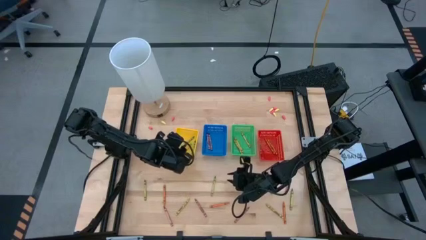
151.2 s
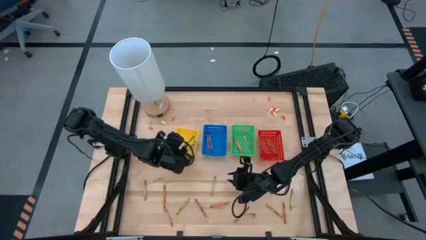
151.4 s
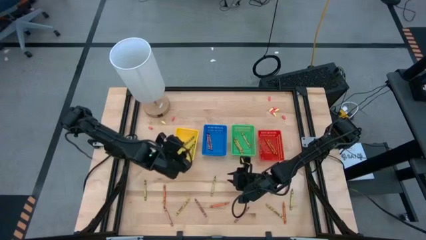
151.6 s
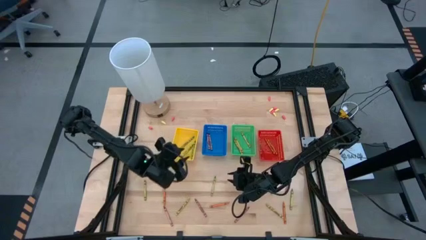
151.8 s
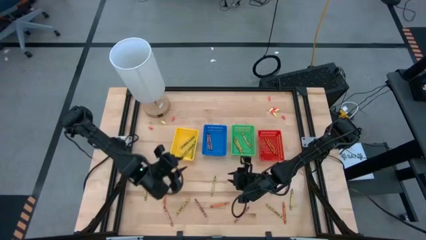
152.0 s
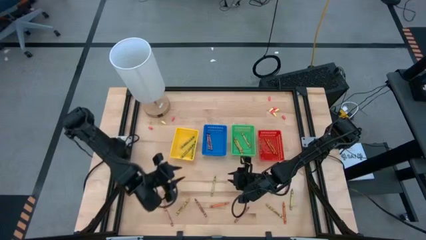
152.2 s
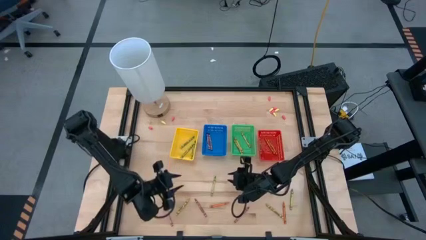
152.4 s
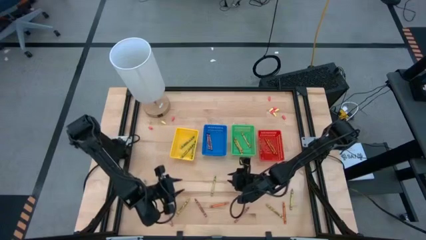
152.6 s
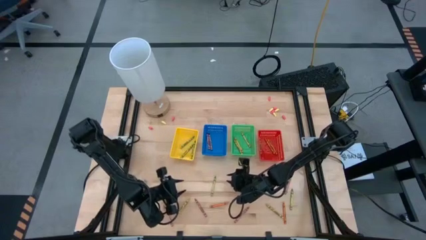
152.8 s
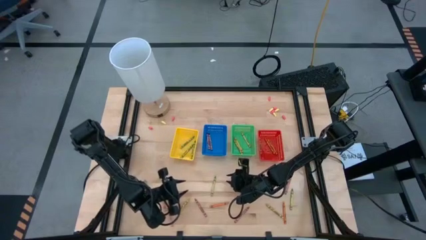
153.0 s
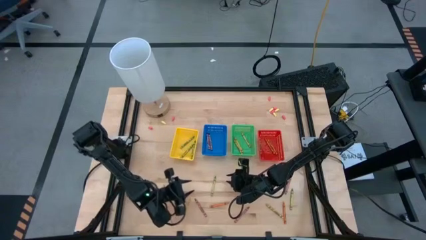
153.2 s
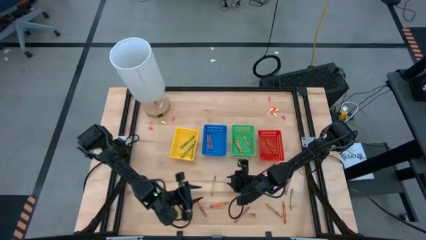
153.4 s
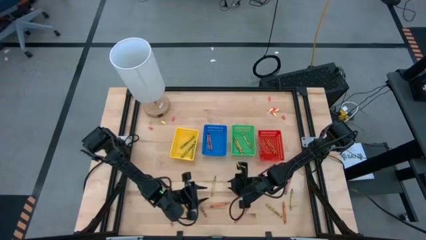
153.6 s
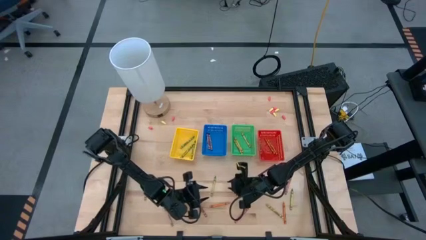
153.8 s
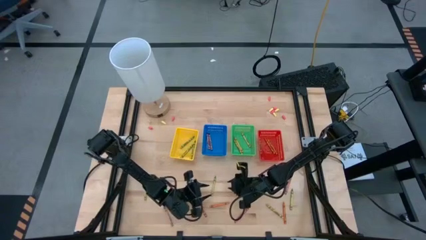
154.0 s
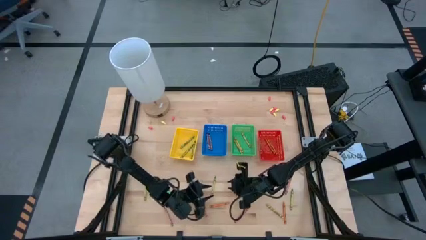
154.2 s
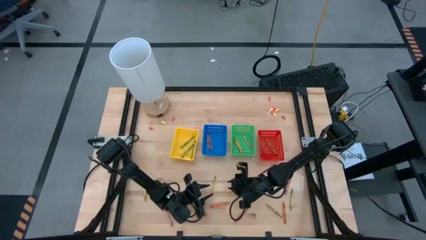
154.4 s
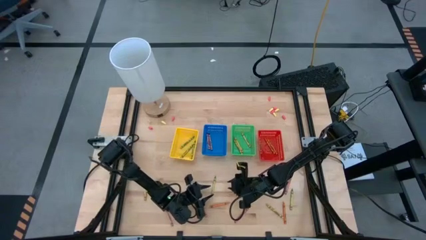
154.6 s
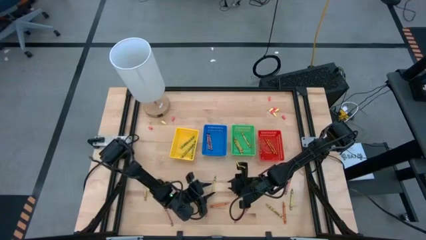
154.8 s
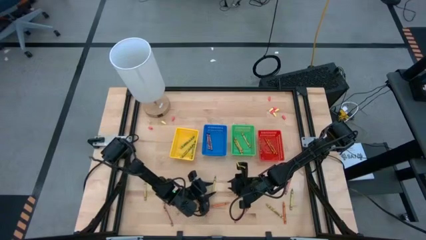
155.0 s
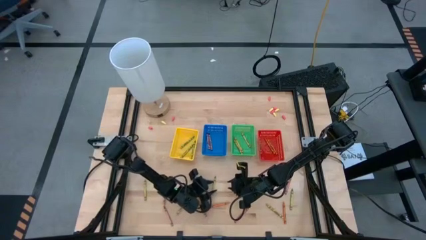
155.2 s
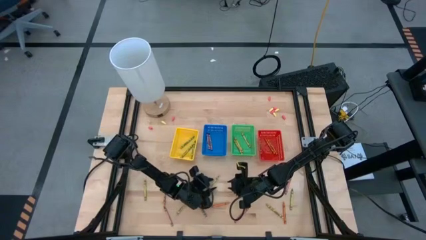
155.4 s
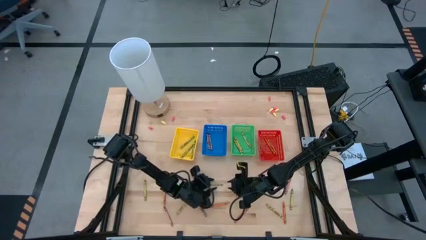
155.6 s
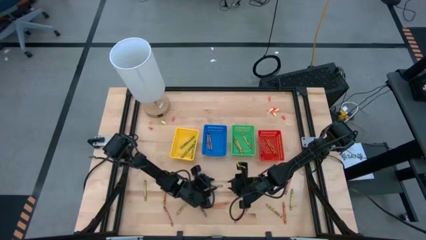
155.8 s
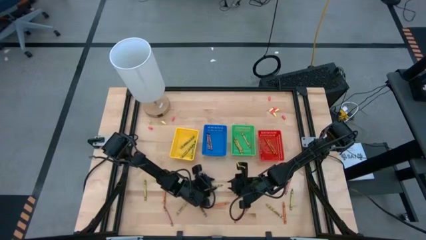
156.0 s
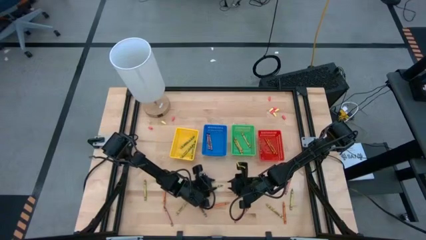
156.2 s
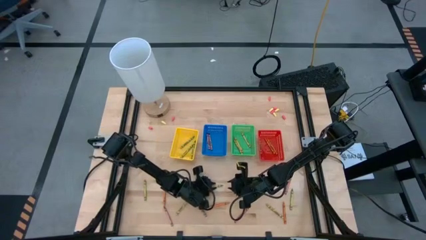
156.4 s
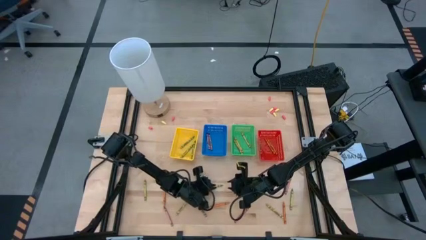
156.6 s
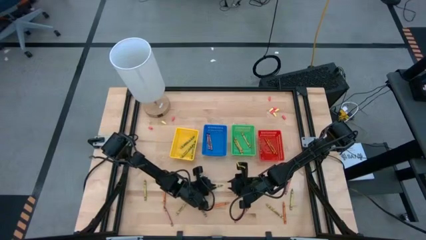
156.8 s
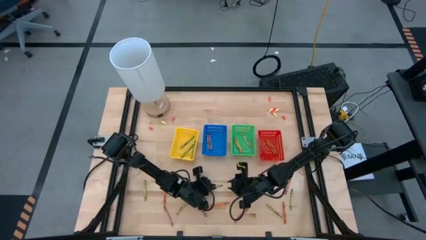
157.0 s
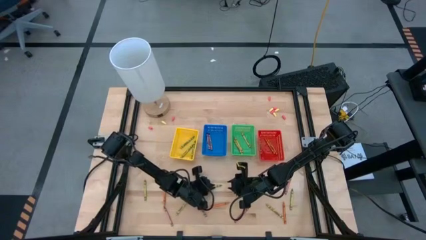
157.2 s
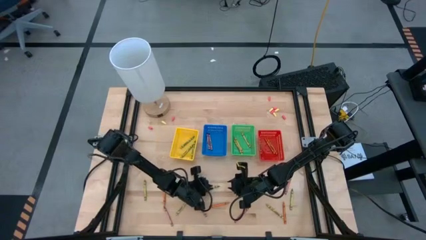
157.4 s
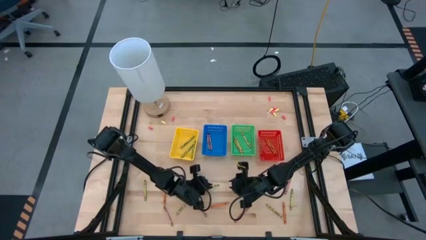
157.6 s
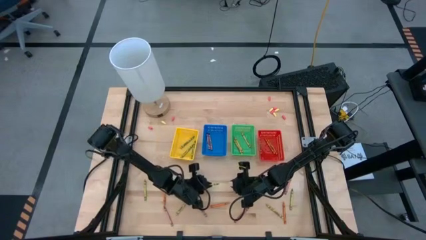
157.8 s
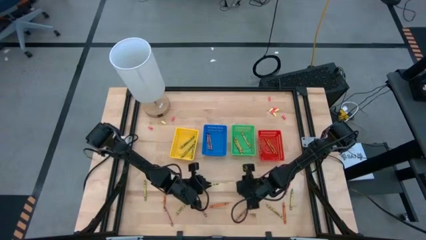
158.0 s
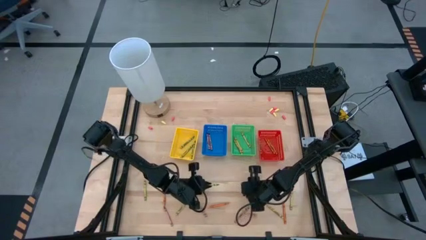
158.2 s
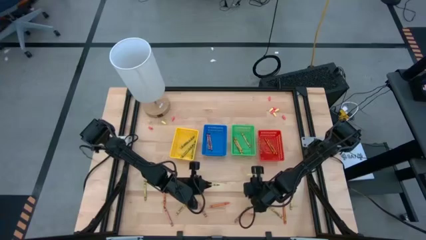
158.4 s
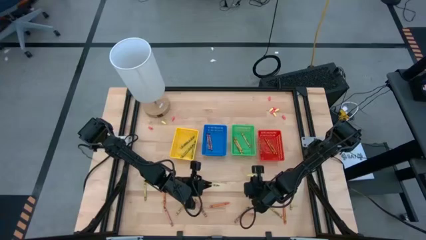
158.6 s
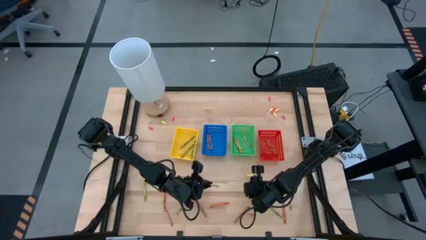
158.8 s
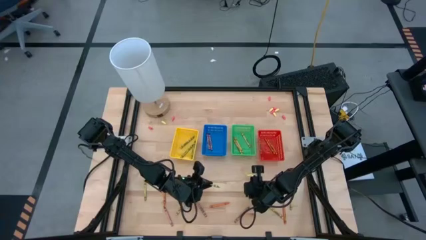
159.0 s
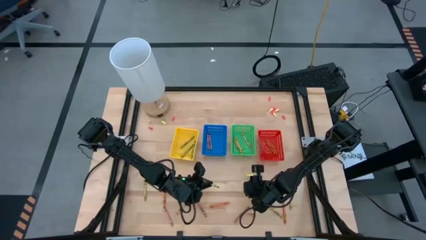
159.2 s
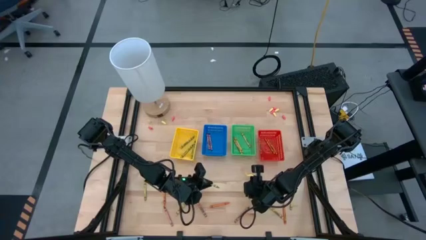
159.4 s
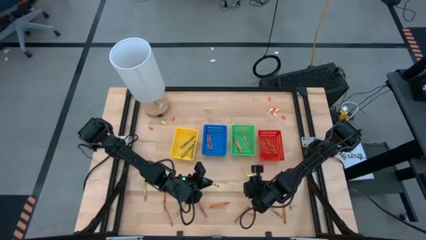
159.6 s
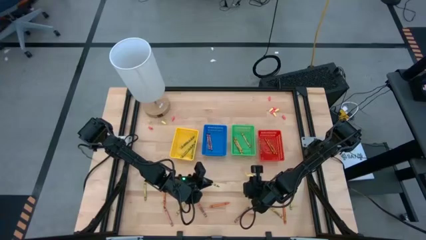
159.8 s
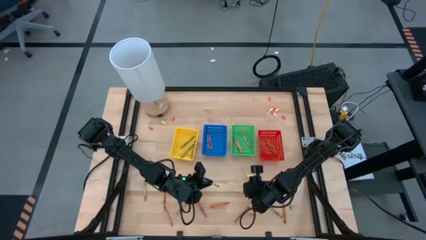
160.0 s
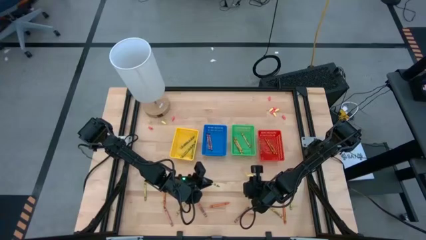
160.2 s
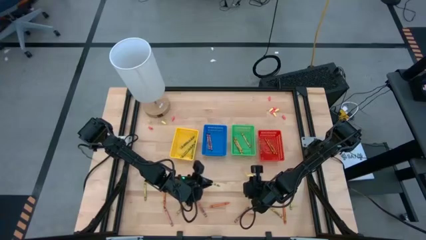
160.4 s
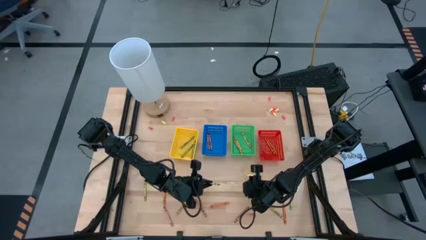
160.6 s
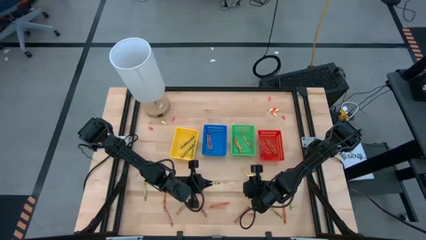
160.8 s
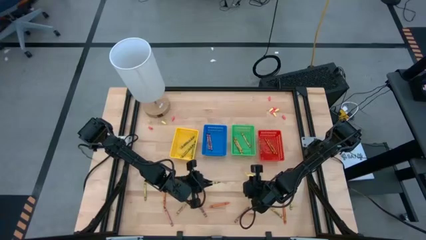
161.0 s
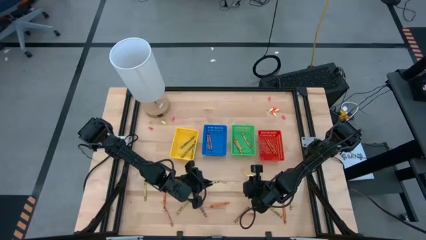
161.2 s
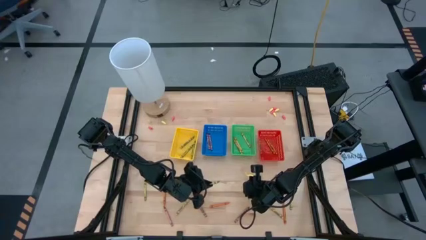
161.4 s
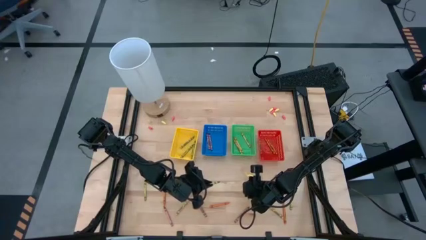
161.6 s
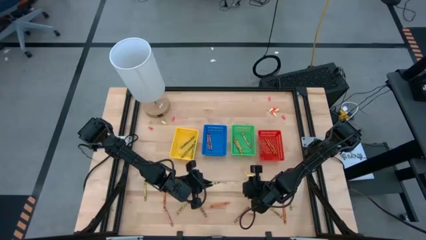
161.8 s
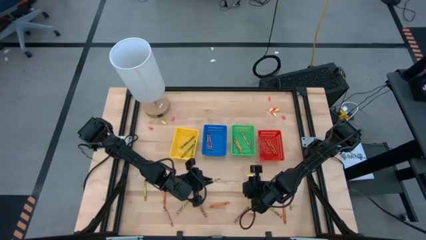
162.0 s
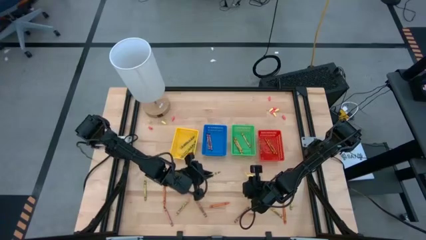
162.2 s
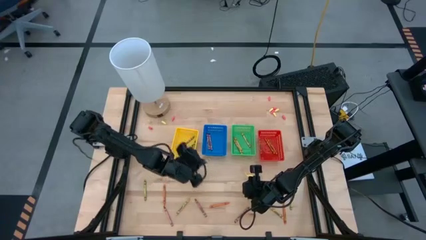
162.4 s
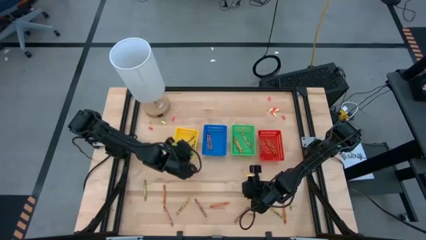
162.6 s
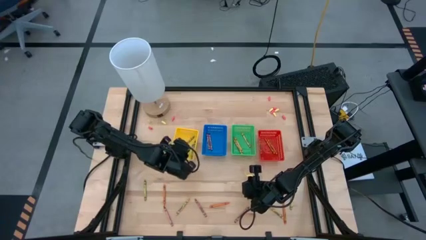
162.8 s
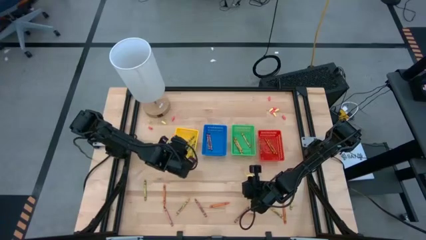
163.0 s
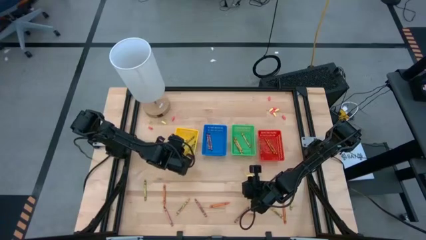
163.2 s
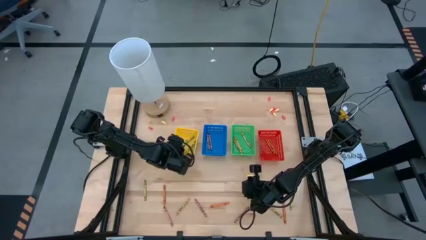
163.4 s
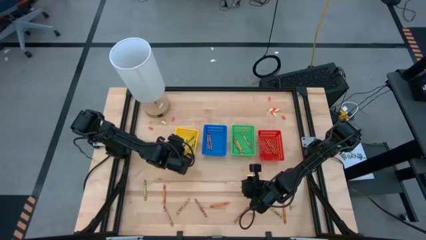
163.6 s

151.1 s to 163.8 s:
Task: Sort crayons
Put the green crayon into the yellow bin

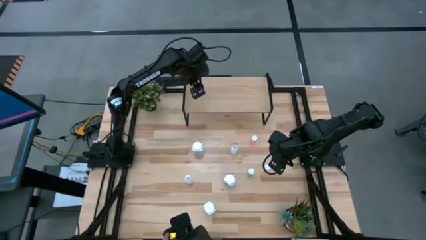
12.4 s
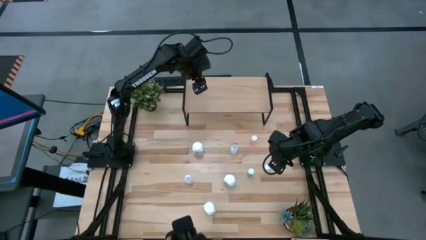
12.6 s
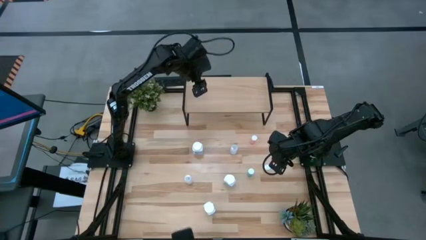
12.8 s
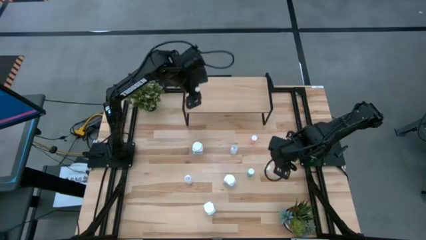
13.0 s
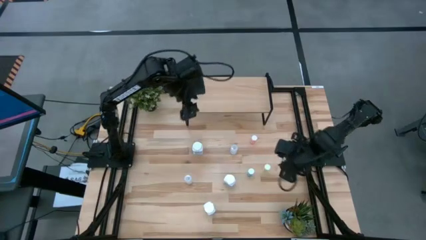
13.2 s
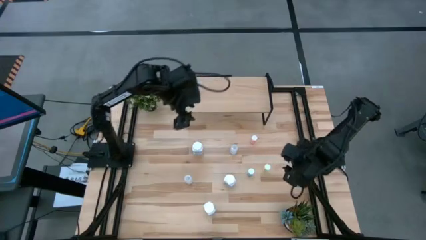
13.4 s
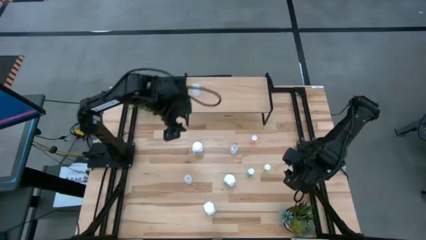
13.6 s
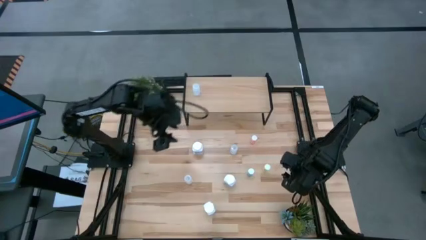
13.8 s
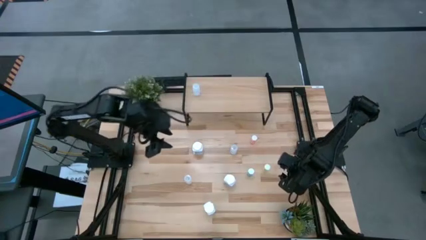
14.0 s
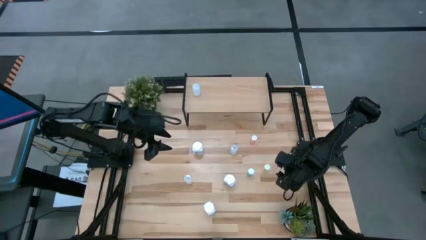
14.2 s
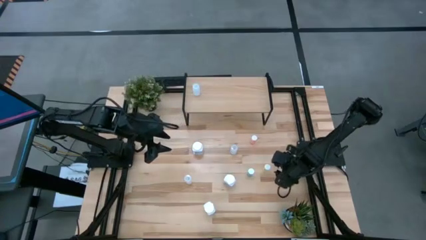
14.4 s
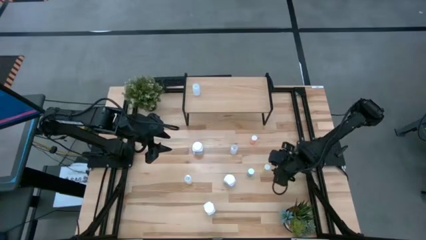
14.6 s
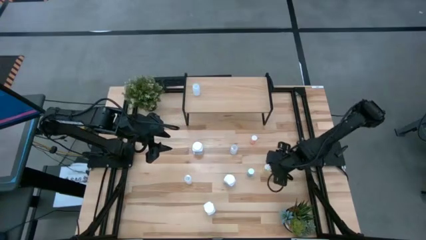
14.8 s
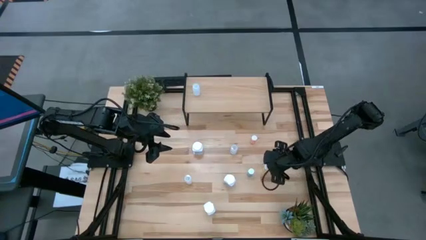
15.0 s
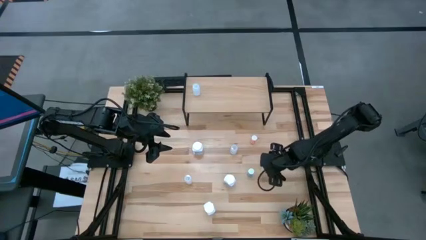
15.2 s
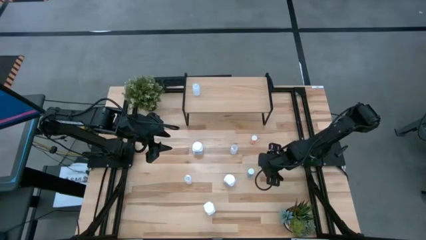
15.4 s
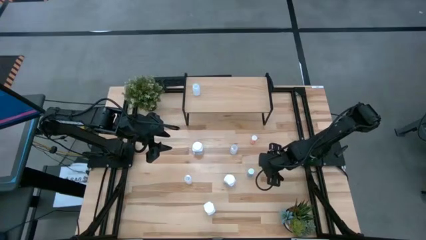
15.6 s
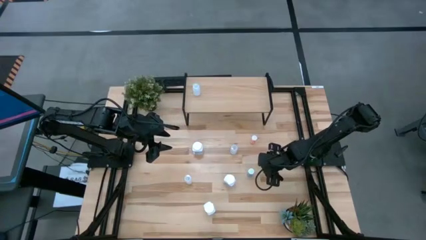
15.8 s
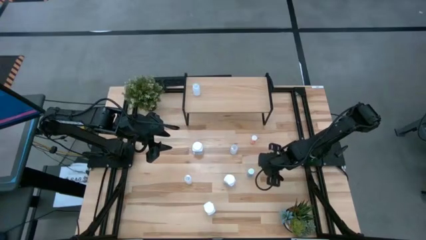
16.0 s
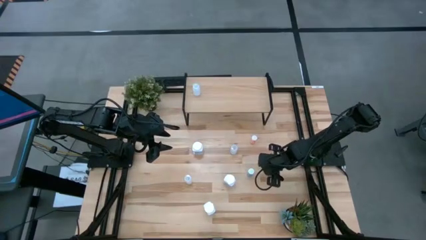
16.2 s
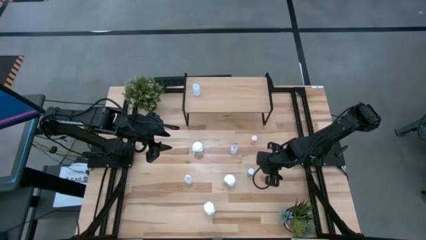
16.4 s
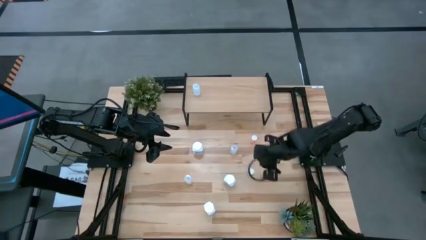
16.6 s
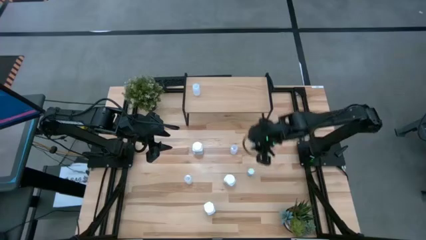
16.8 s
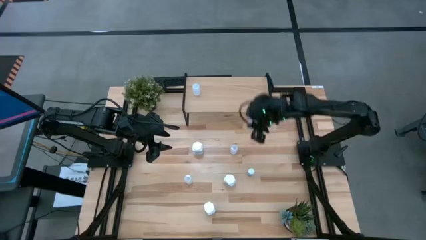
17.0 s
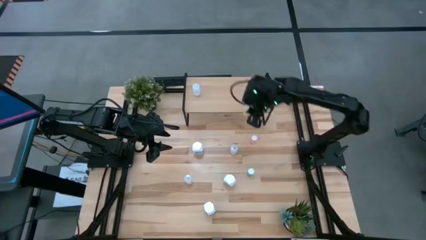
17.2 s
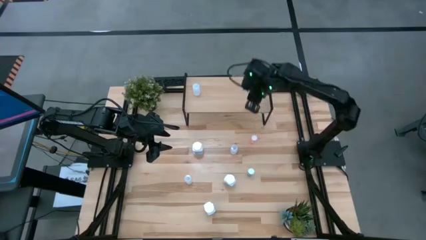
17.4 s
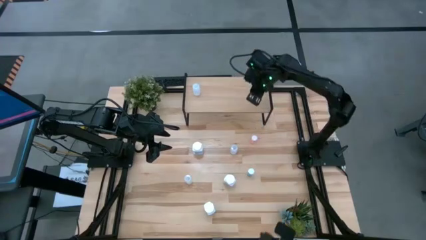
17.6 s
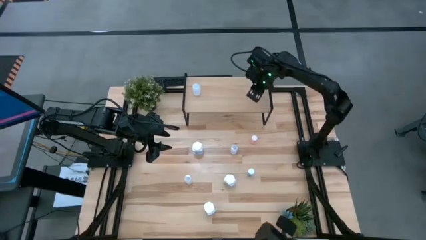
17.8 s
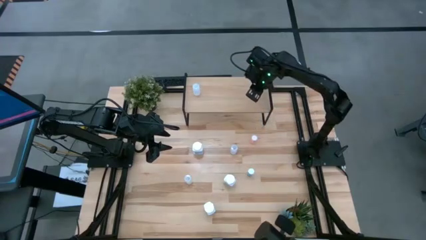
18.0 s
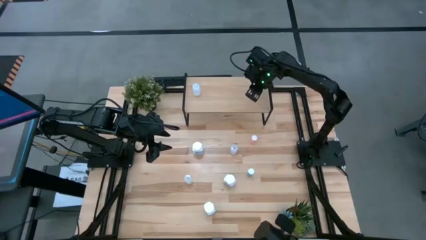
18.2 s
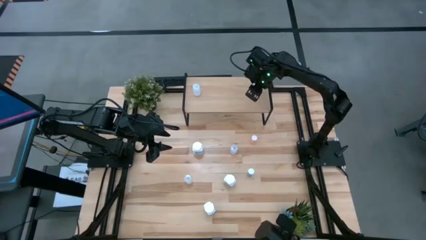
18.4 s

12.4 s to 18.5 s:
Task: Pick and place medicine bottles onto shelf by color
Put the yellow transparent pill bottle on the shelf
